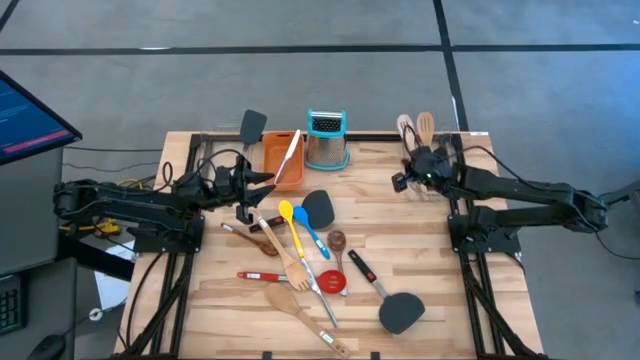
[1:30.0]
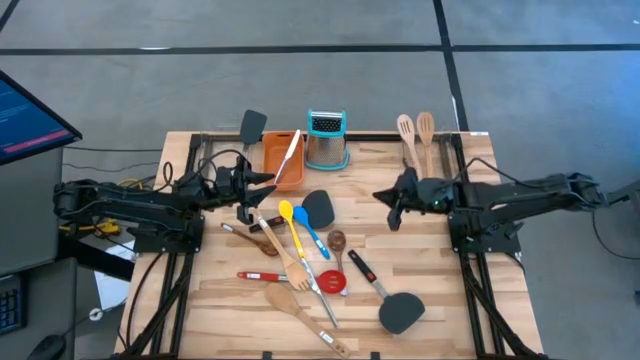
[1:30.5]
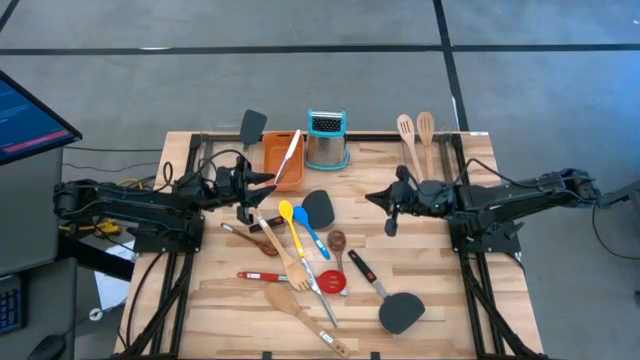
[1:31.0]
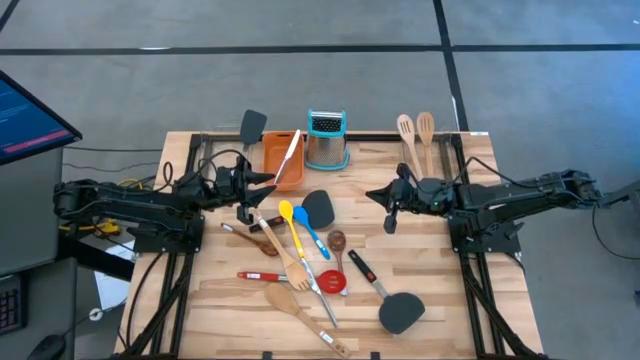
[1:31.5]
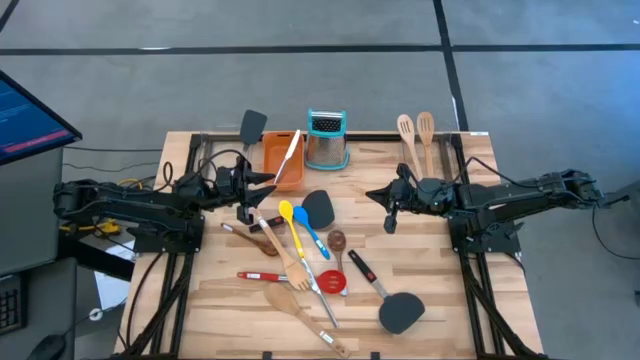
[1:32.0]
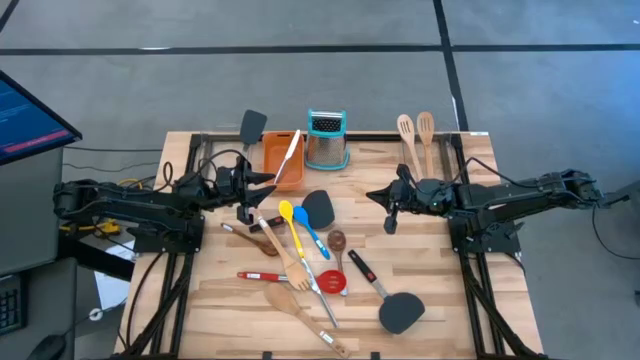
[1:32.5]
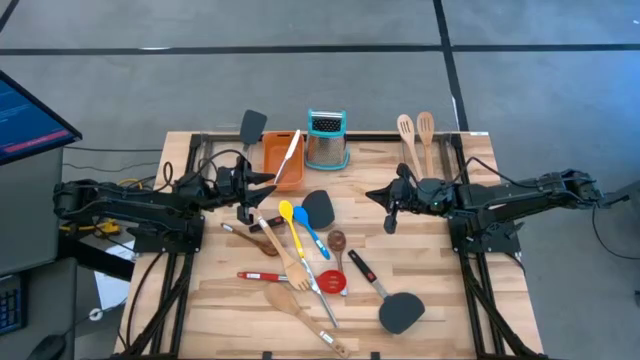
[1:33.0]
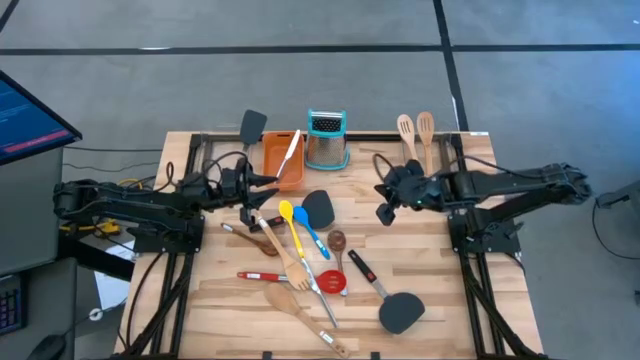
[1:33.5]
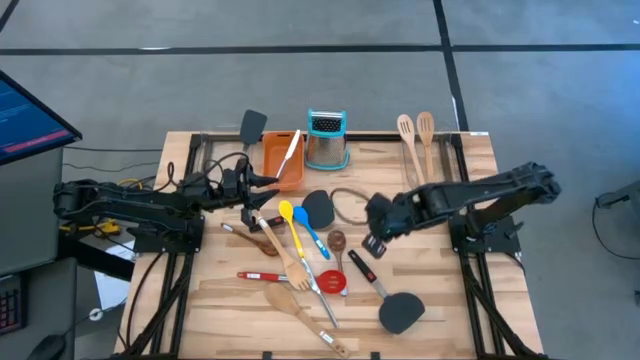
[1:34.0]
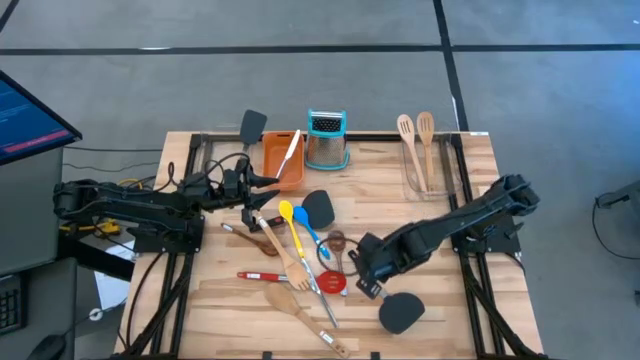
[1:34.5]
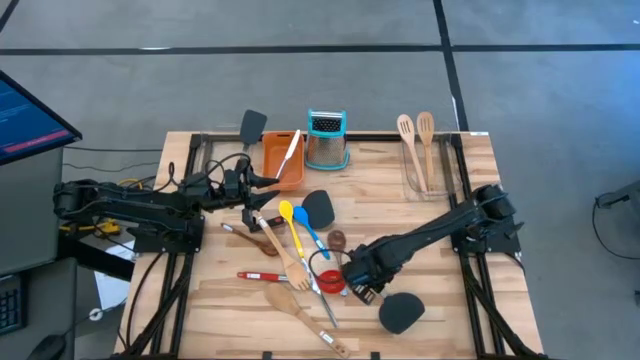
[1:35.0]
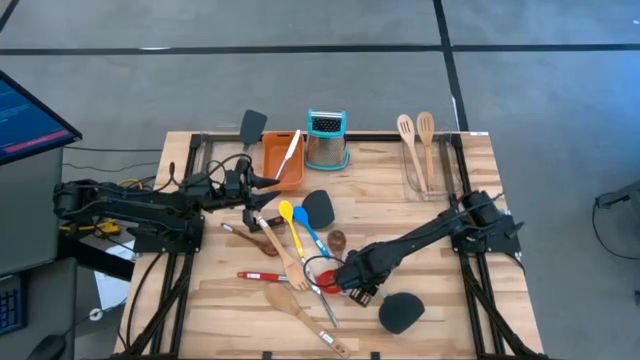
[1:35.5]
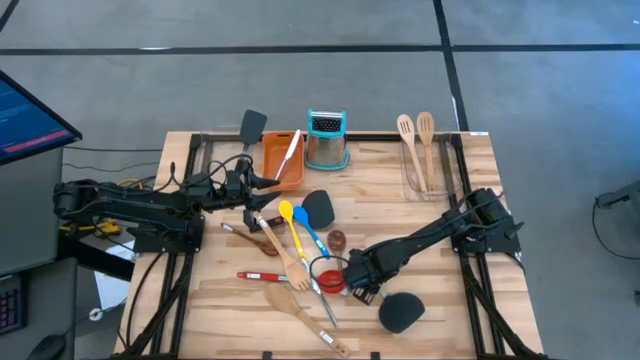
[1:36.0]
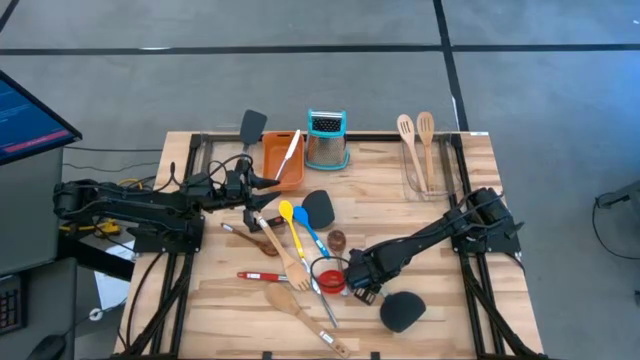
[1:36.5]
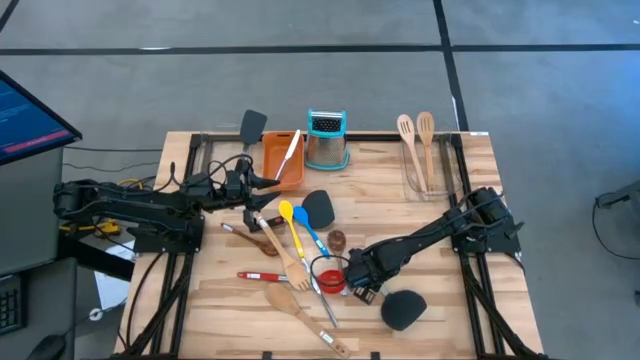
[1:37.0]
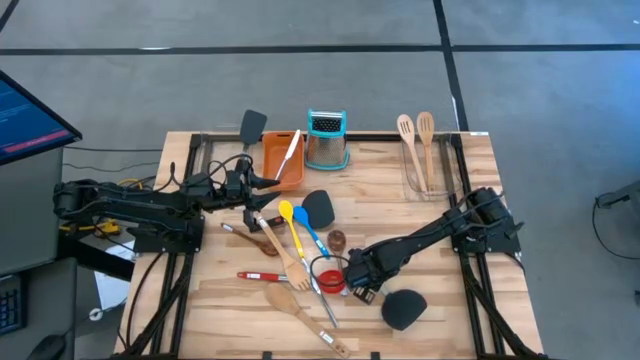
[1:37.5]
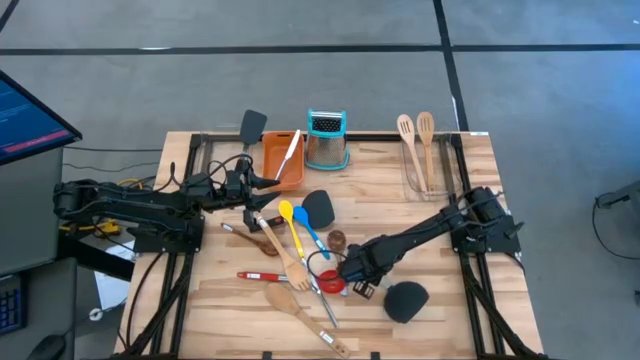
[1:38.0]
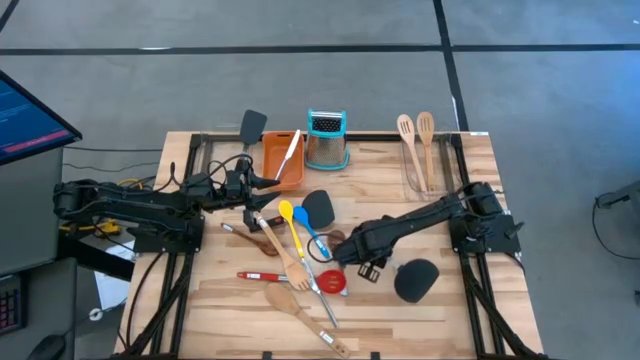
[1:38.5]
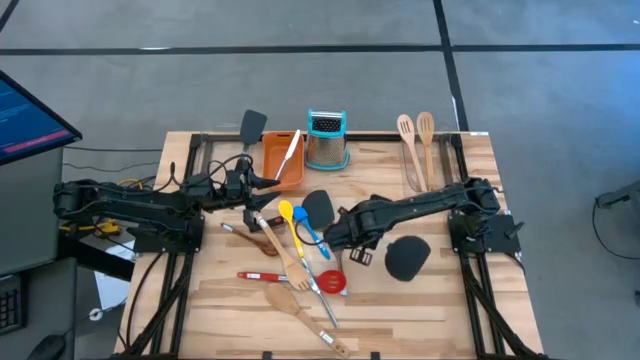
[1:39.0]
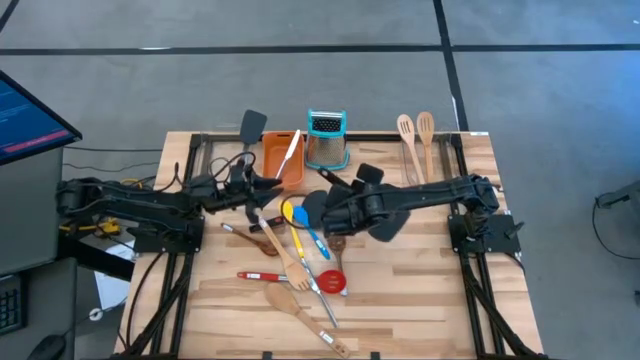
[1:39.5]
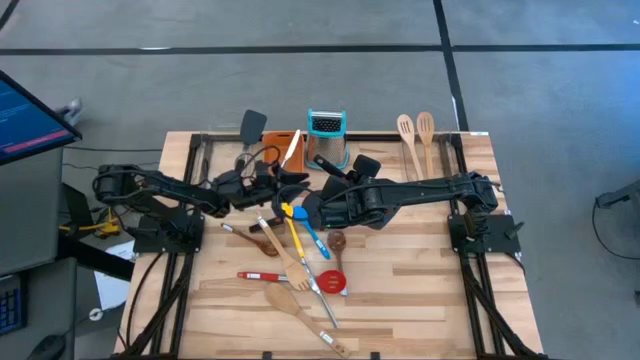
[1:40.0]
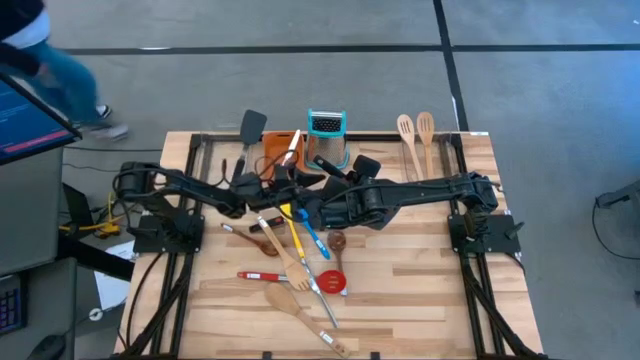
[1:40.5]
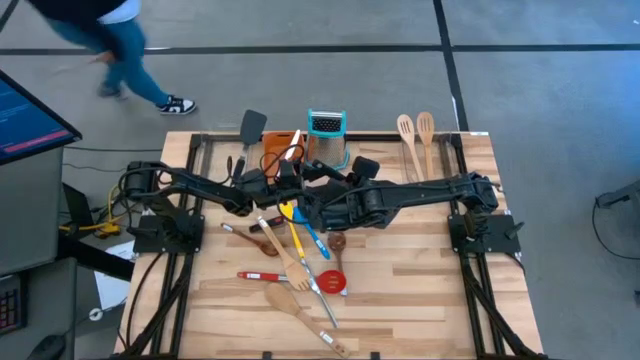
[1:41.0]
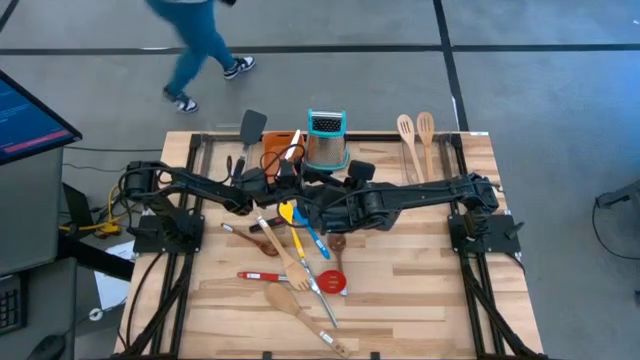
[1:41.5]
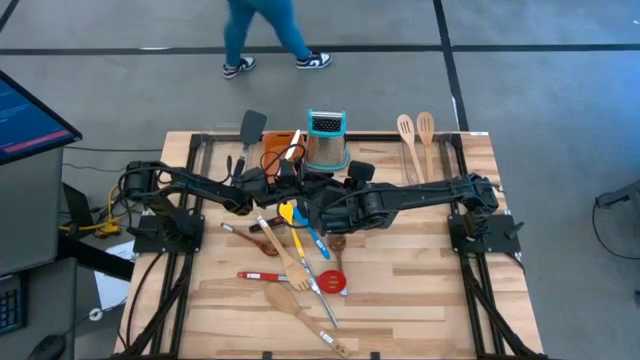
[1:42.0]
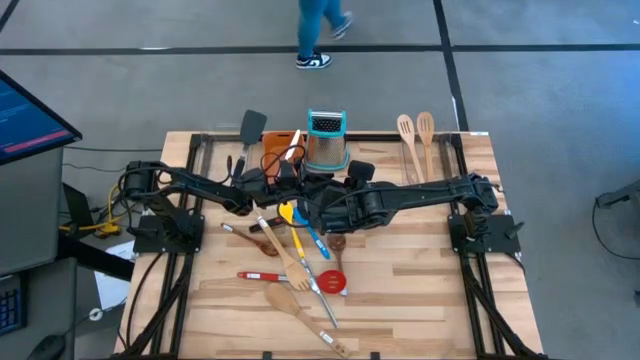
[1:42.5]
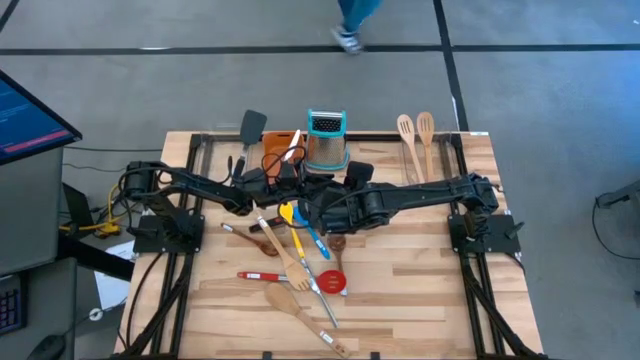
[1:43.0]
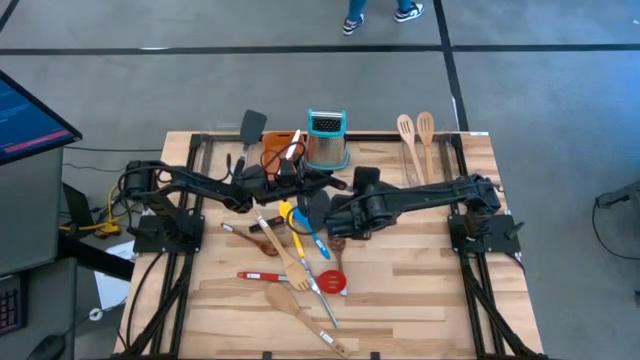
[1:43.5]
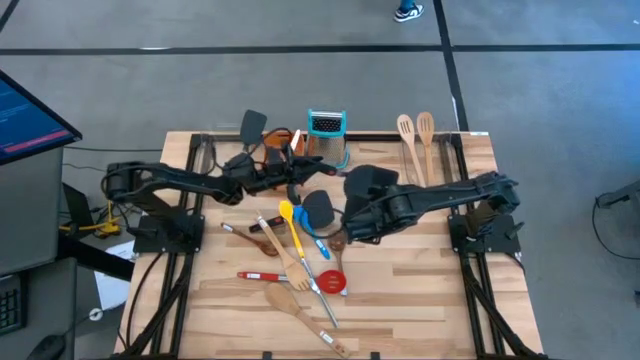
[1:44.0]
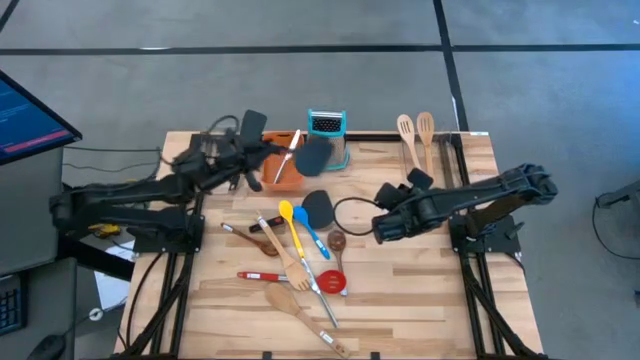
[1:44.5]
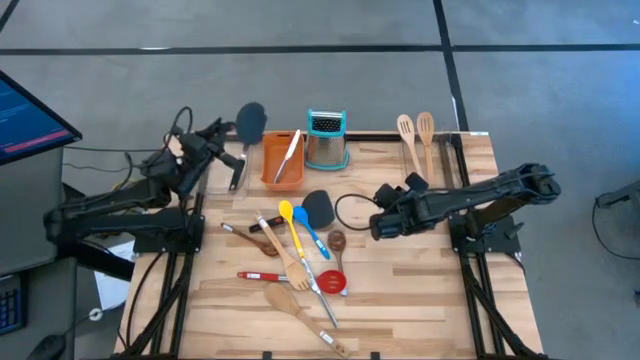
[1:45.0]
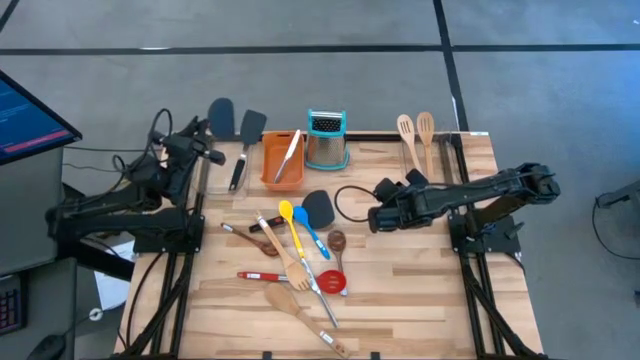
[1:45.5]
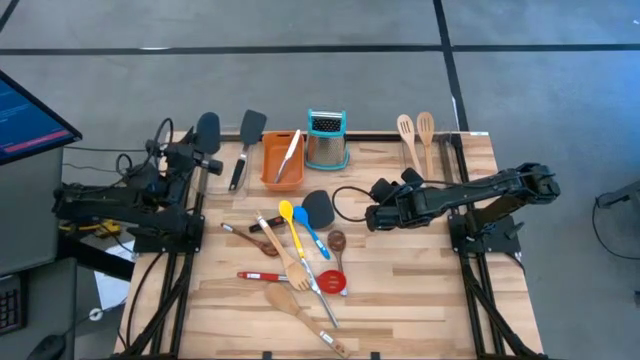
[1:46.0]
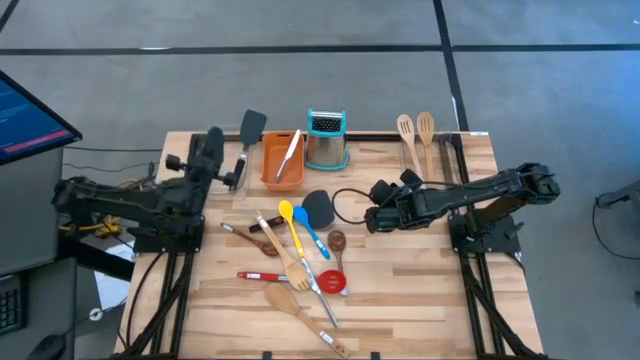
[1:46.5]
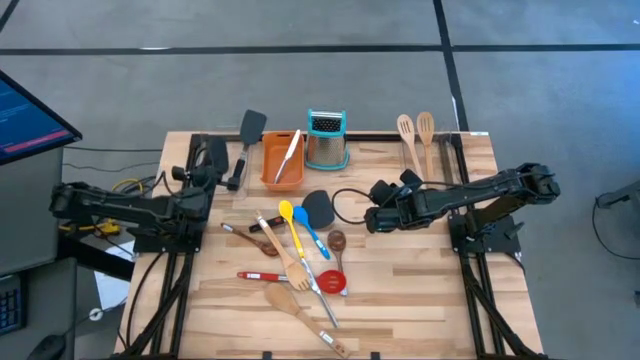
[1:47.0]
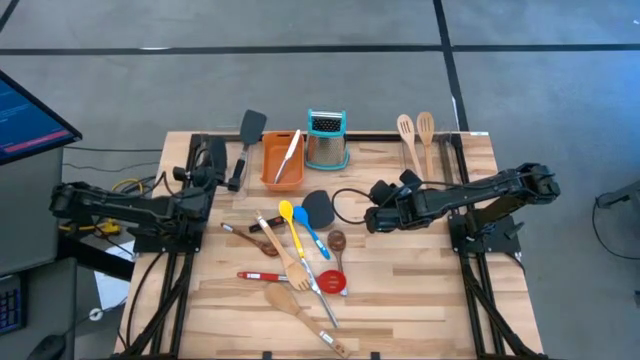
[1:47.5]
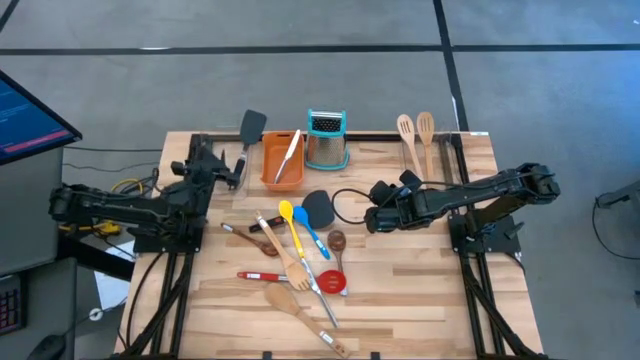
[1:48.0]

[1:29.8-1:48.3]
Task: Pick & Place Kitchen Items
Put the top right plastic spatula into the left transparent bin

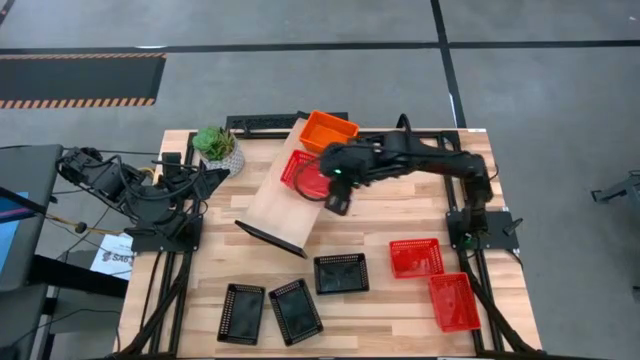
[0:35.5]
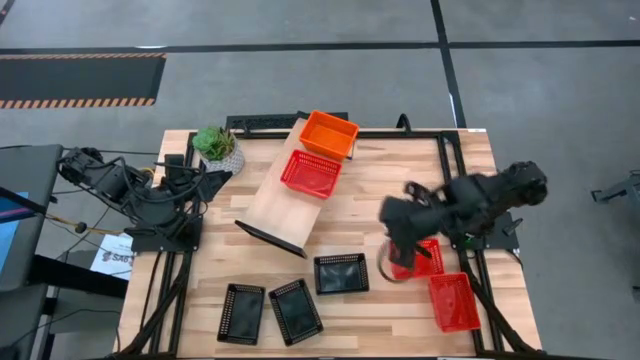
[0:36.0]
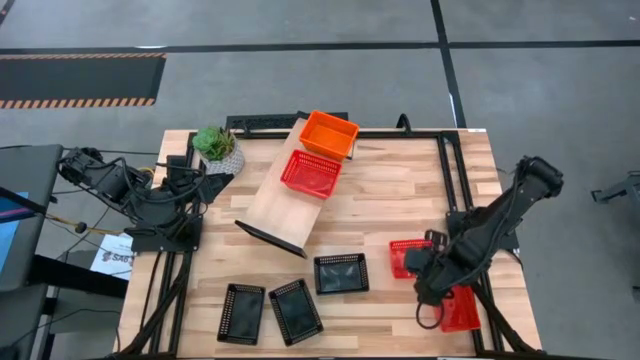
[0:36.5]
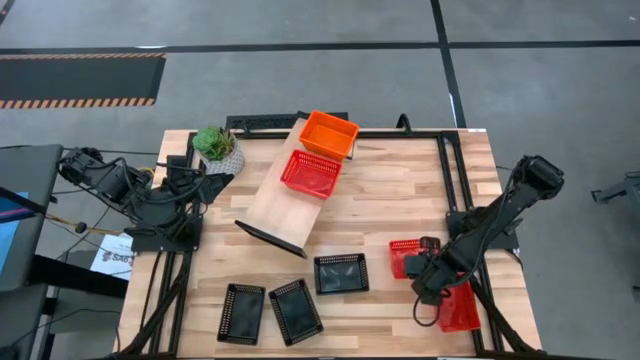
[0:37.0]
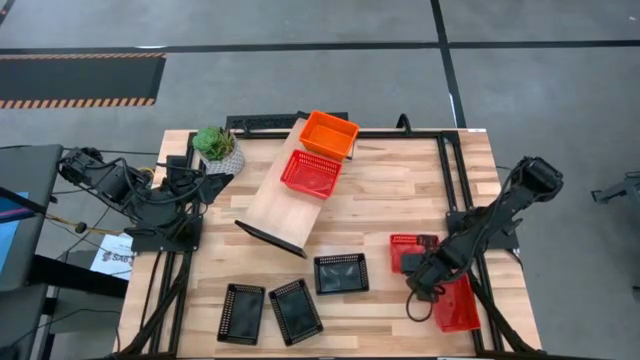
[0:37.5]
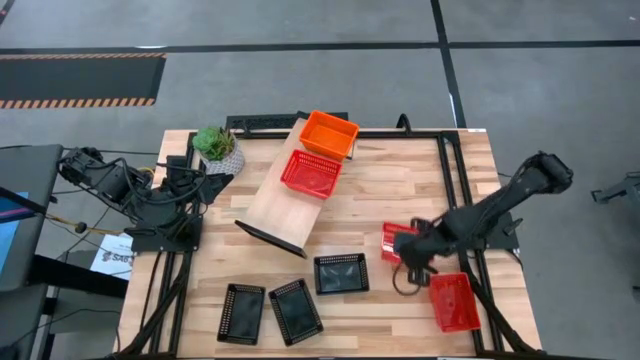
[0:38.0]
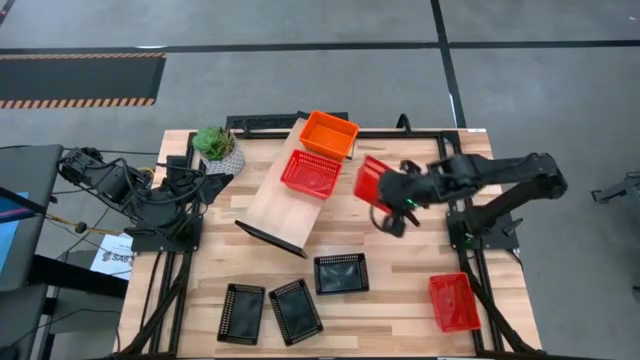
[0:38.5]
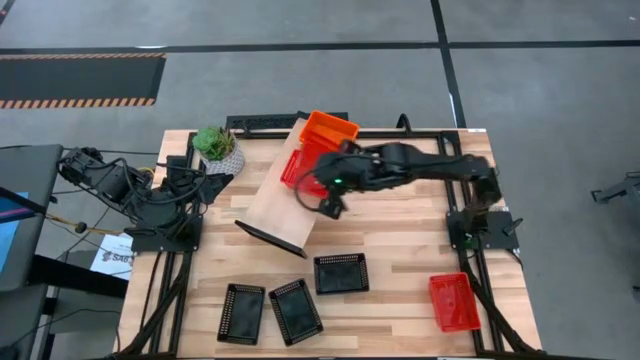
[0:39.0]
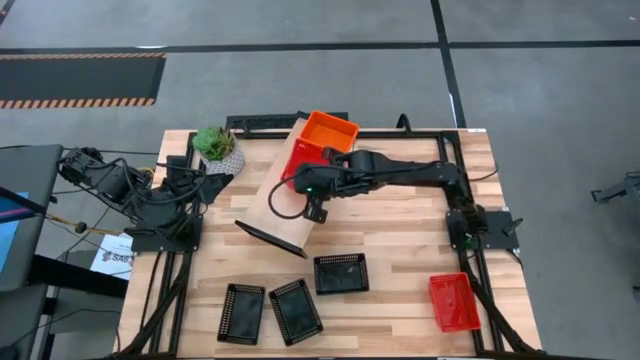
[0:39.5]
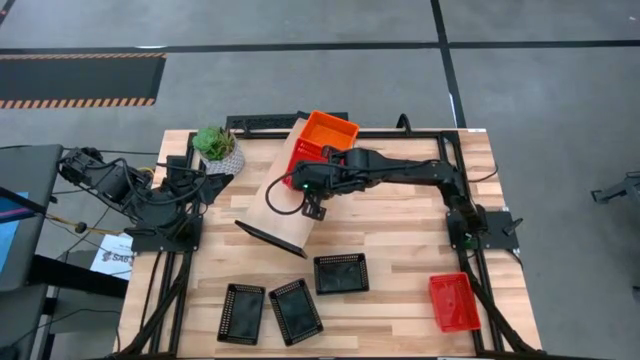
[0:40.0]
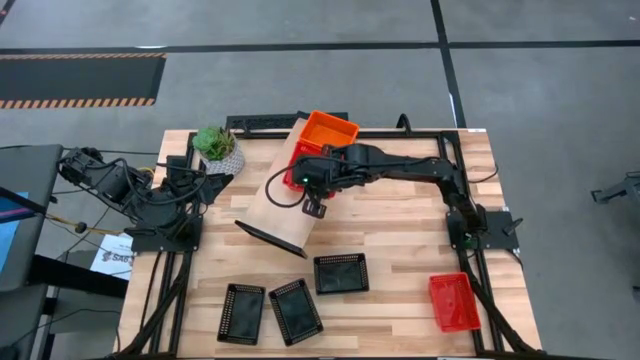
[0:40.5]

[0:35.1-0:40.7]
Task: Stack baskets on shelf by color
Stack the top red bin on top of the red bin on the shelf
